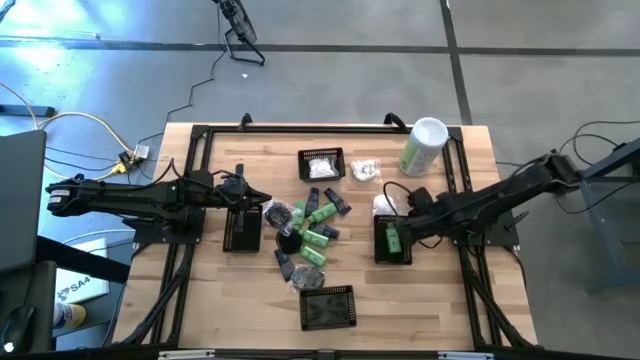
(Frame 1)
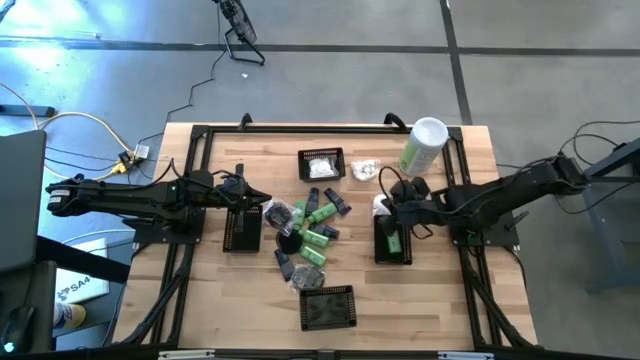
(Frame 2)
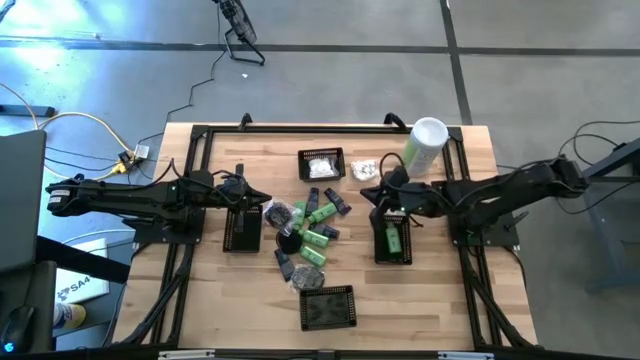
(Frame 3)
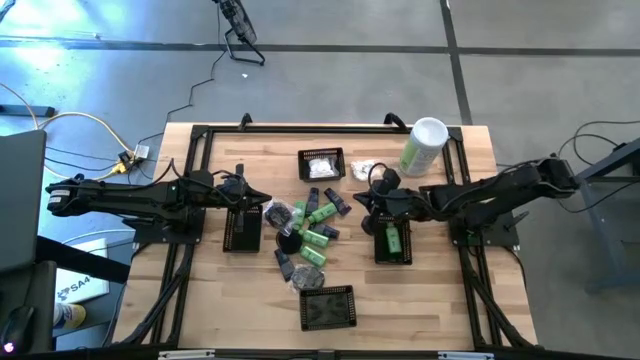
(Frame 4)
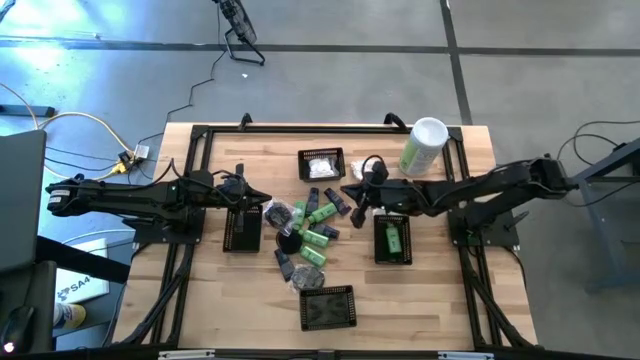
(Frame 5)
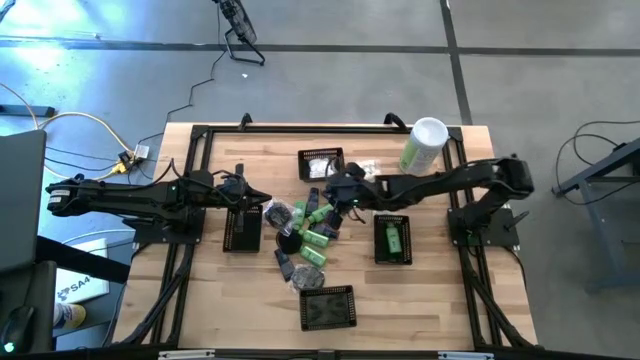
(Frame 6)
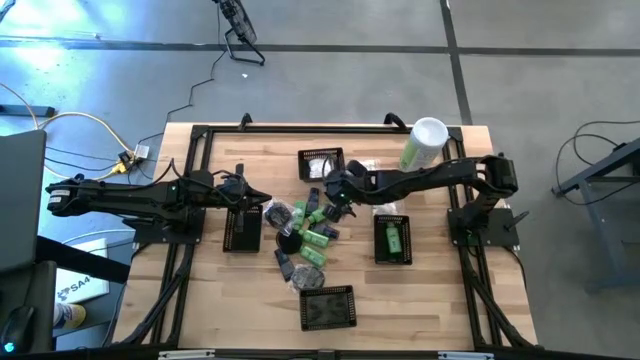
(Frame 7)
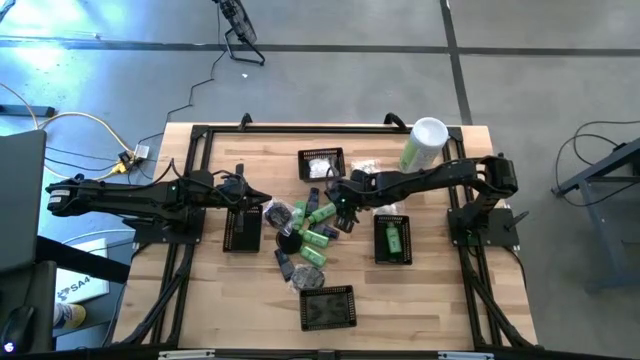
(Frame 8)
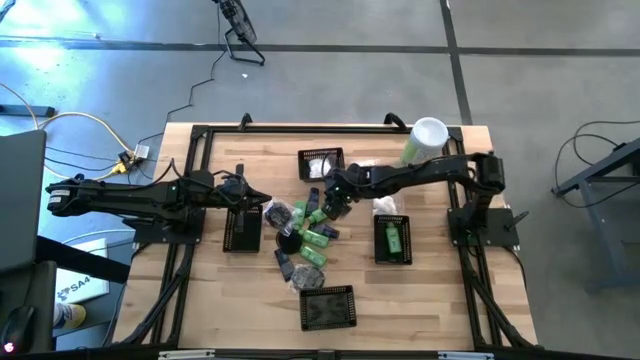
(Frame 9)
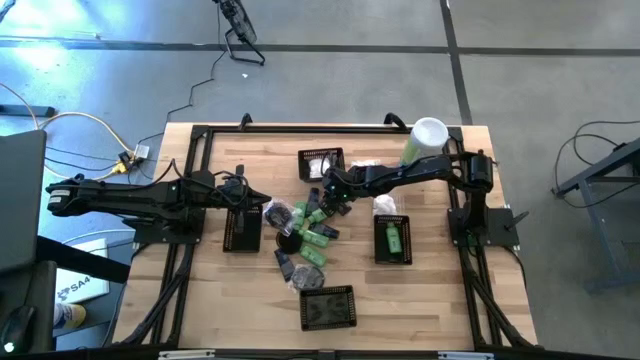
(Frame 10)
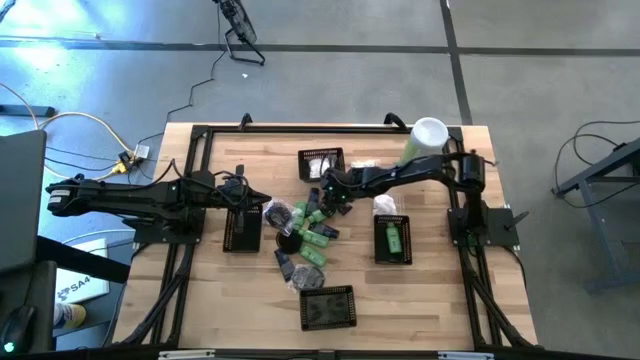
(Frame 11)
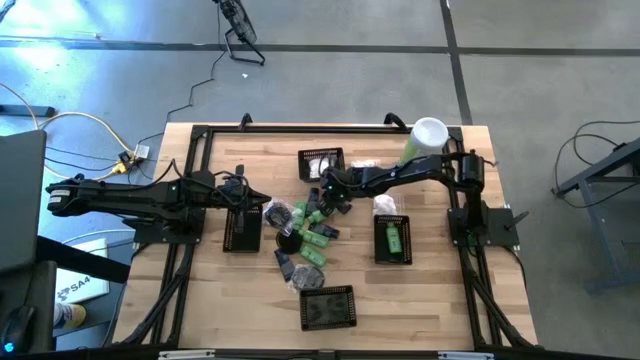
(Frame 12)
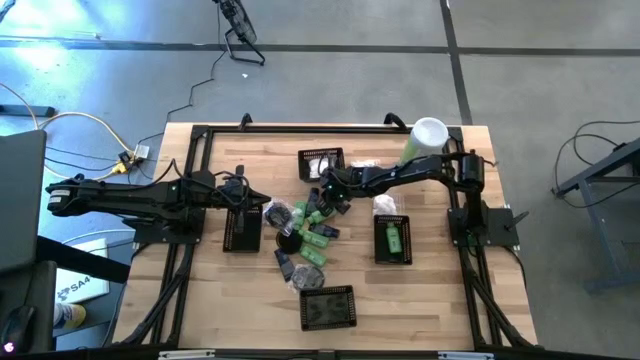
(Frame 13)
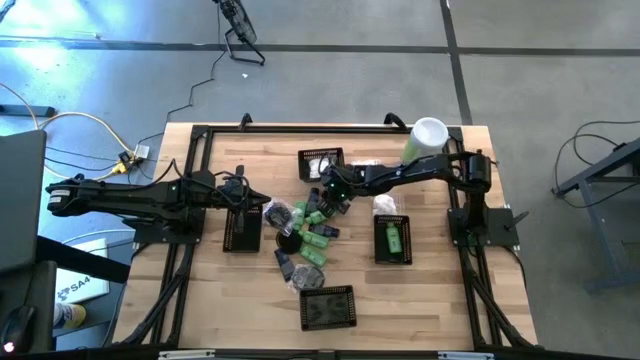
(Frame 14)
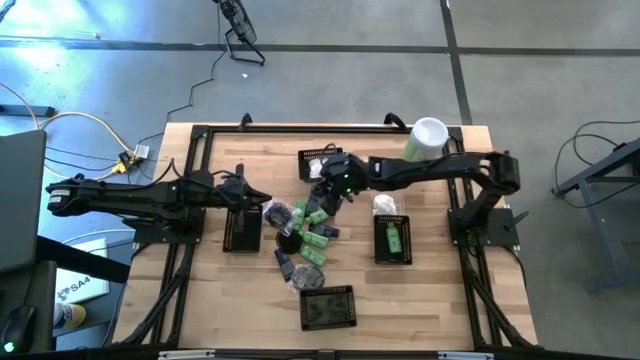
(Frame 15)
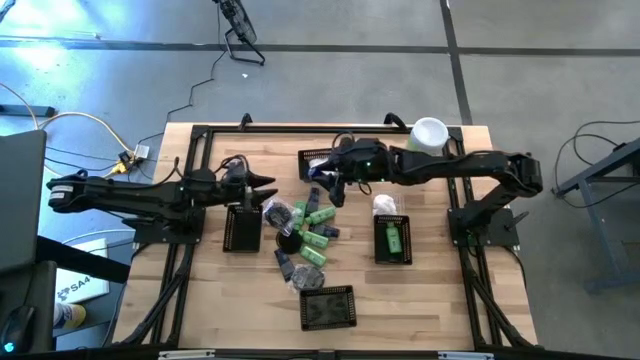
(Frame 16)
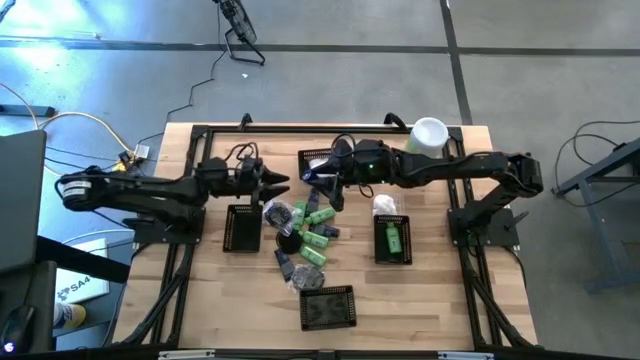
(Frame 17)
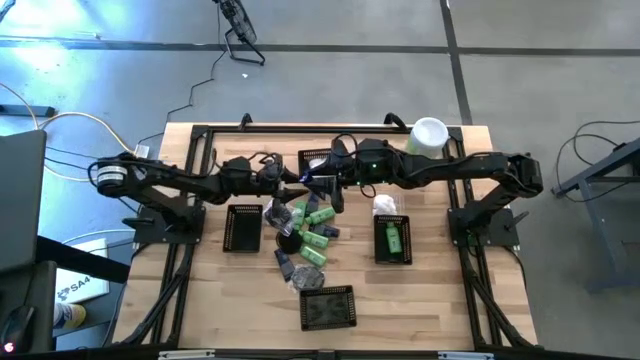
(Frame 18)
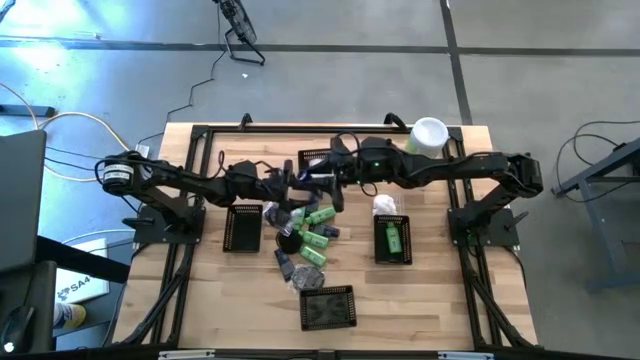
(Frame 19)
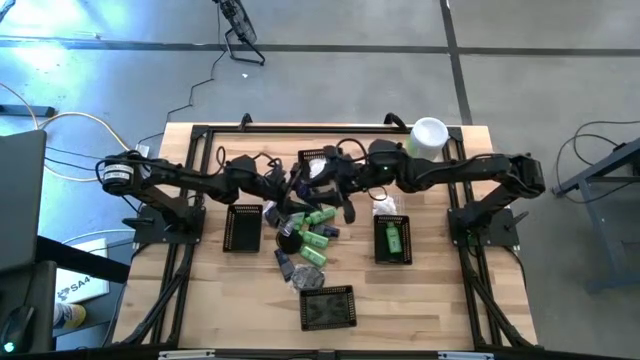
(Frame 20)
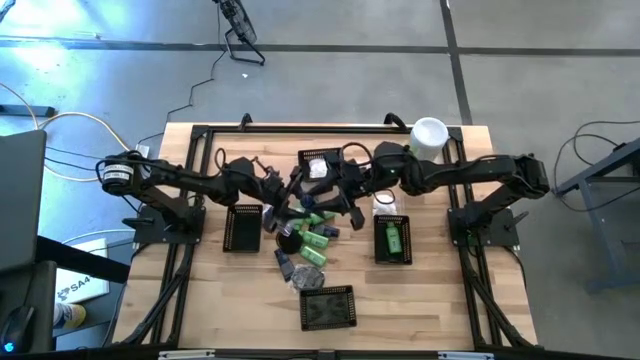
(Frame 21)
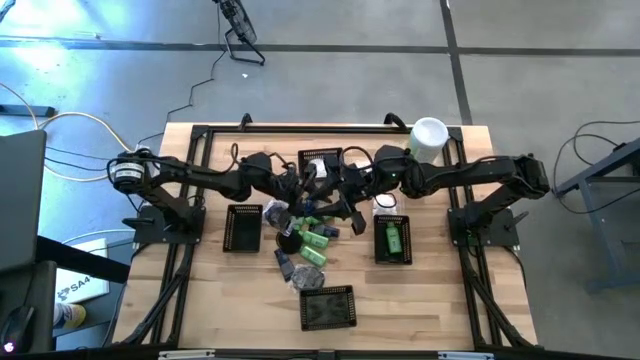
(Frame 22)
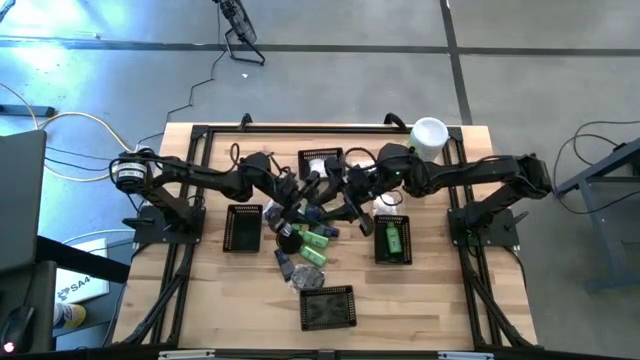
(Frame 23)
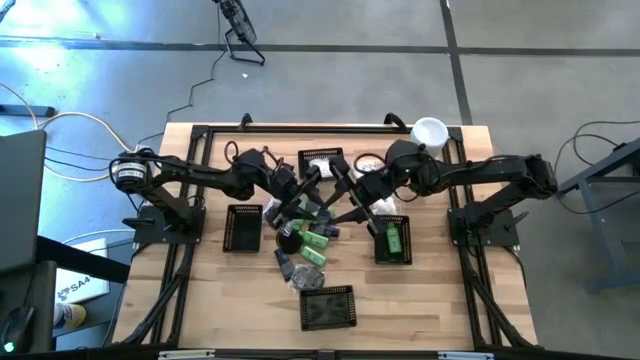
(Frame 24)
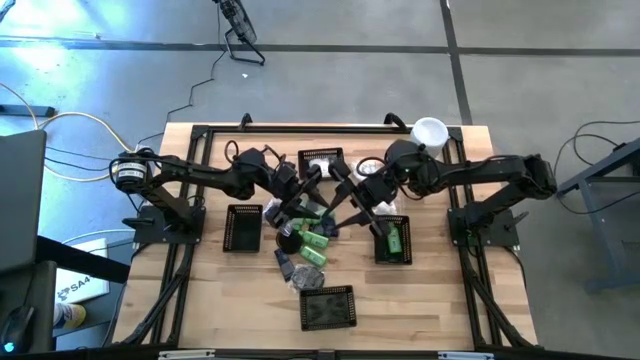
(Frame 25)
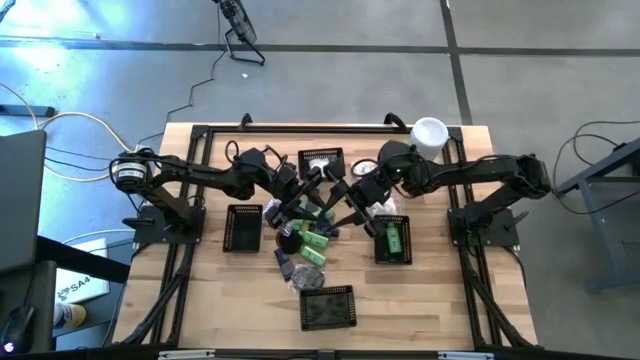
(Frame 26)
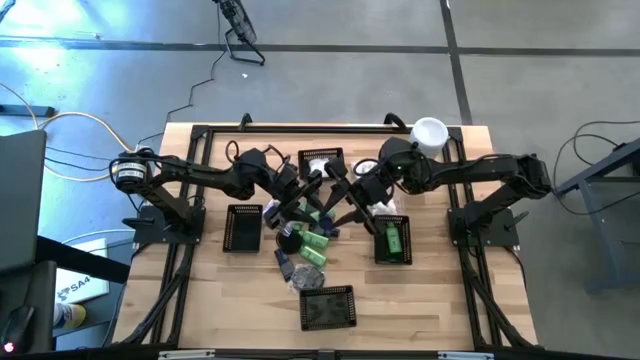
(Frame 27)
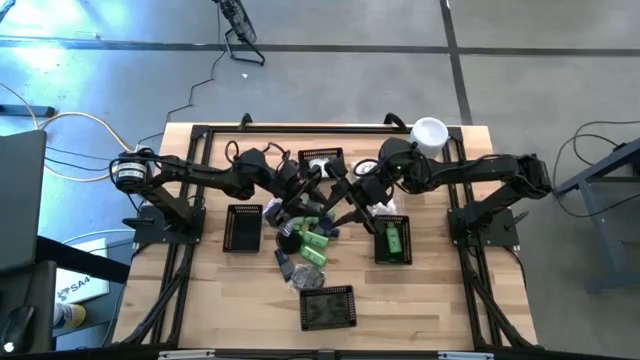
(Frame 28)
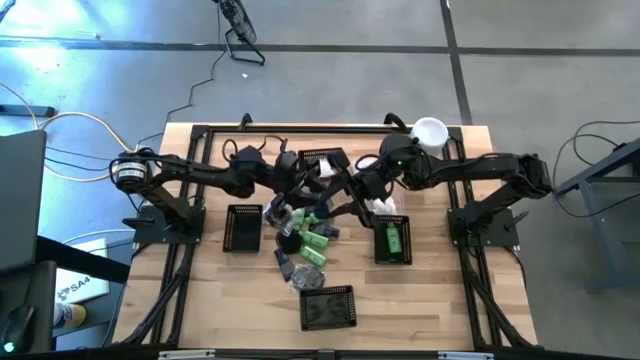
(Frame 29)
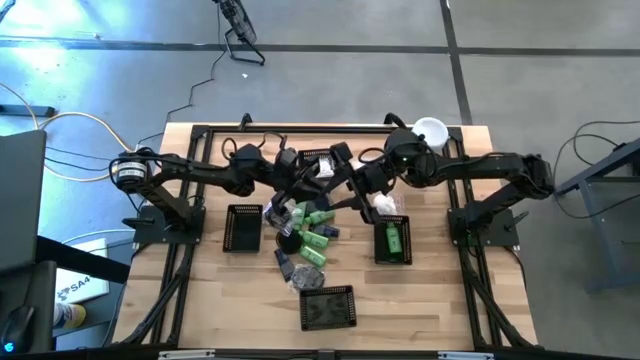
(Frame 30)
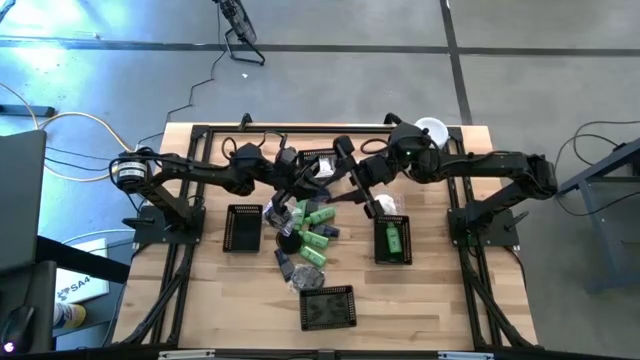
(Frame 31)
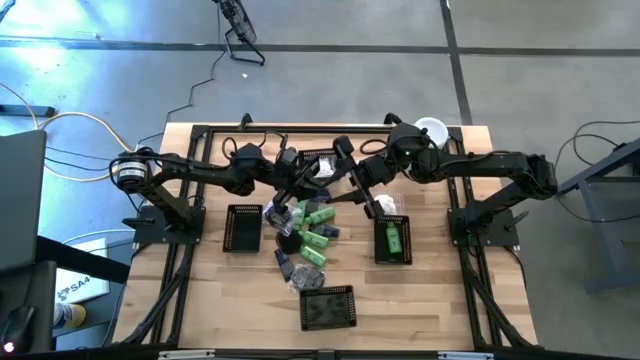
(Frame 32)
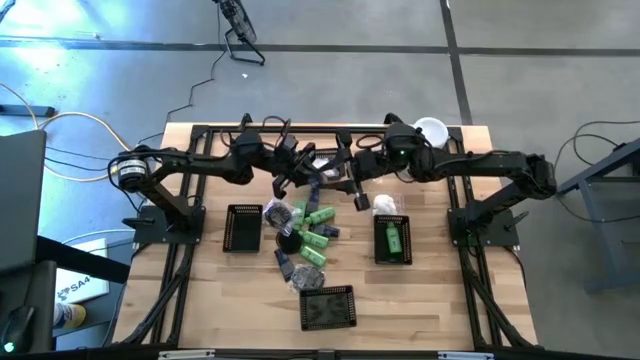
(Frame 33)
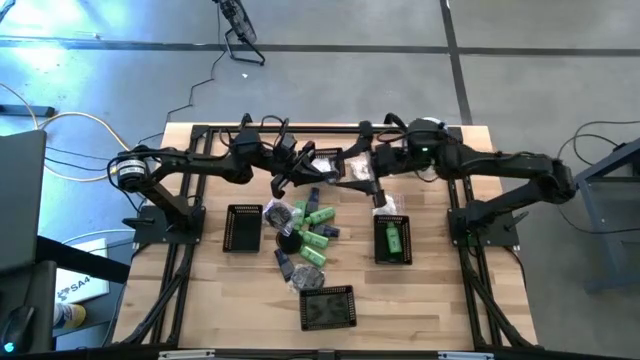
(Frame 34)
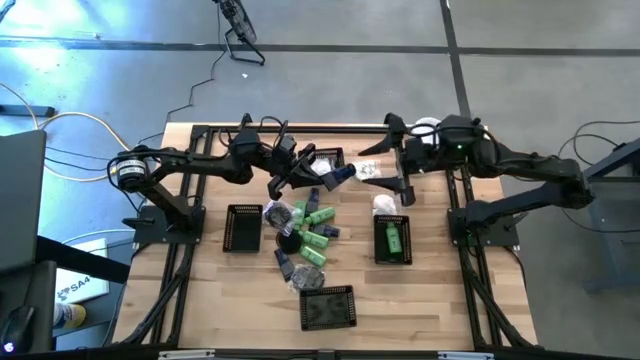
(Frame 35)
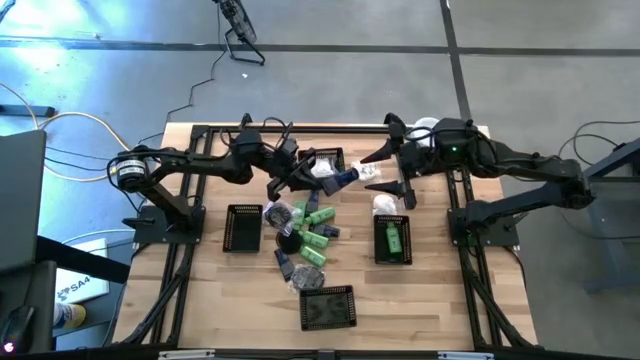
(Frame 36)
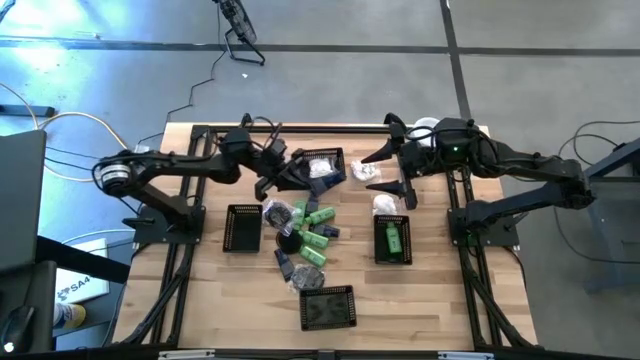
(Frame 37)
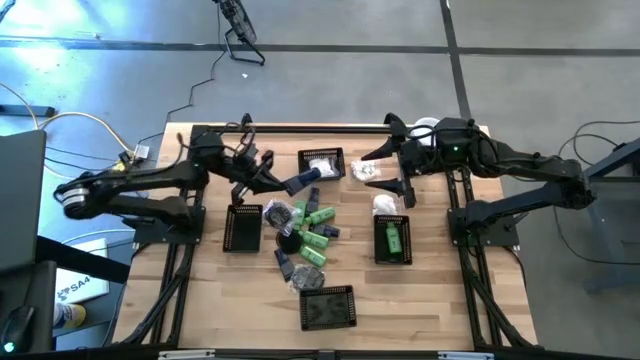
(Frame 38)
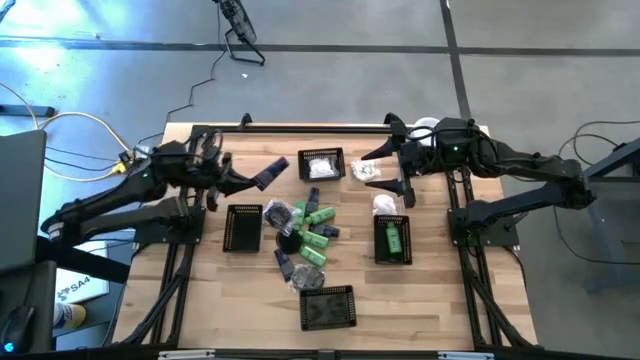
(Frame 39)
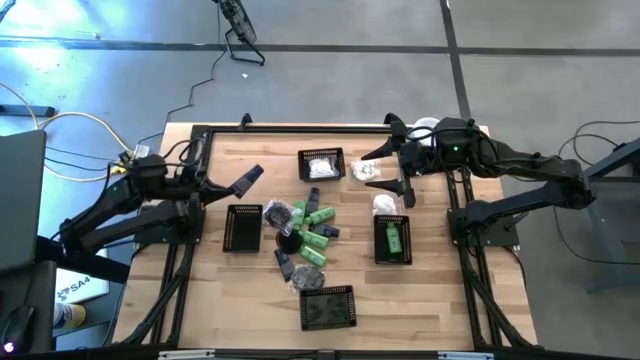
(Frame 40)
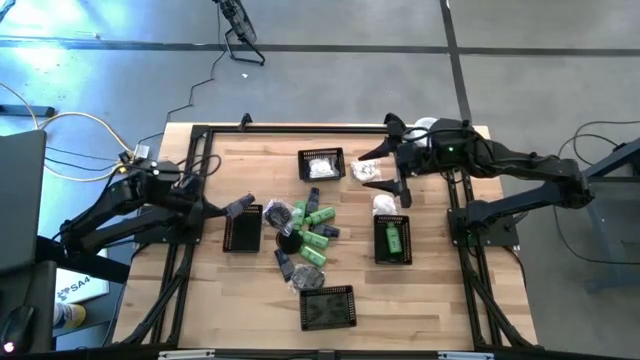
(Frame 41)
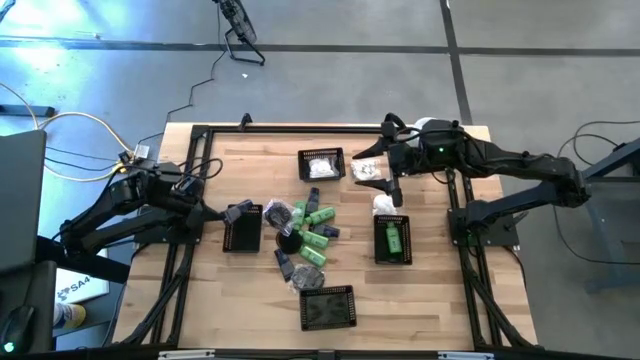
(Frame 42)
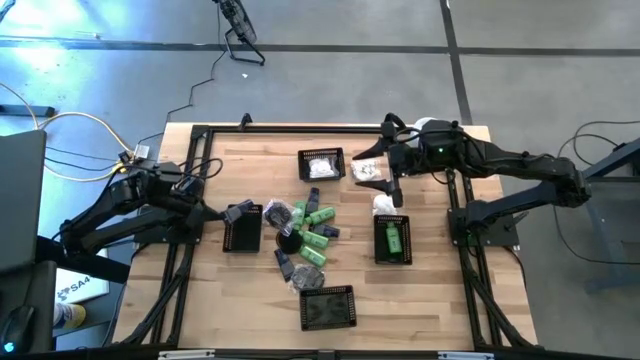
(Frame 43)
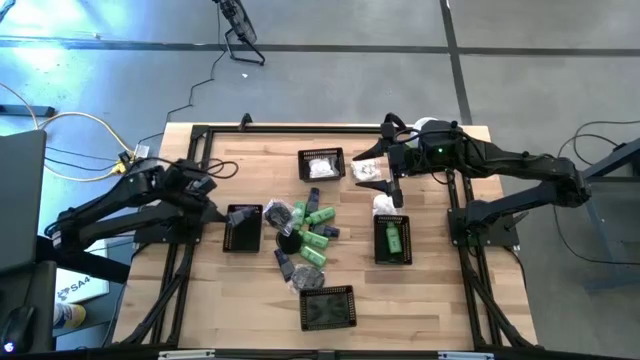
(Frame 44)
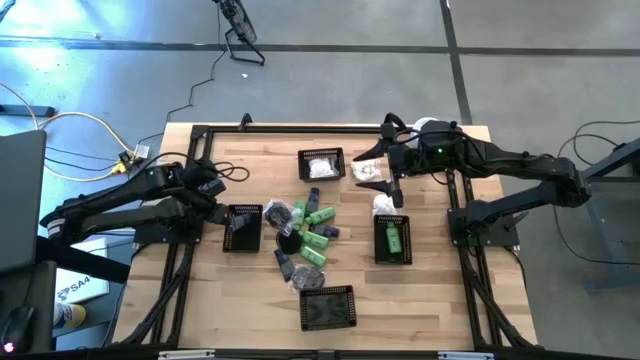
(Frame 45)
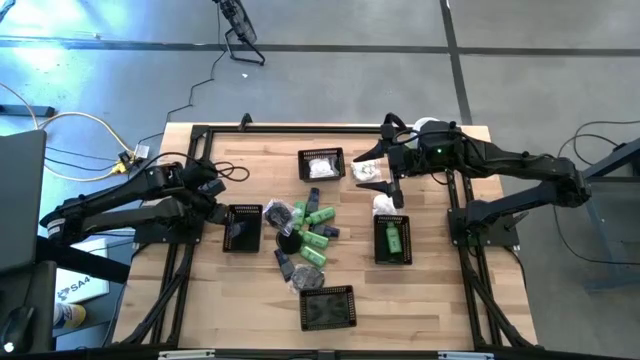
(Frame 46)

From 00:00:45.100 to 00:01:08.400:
Task: Pick & Place Travel size toiletries
Put the blue bottle into the middle left black bin
